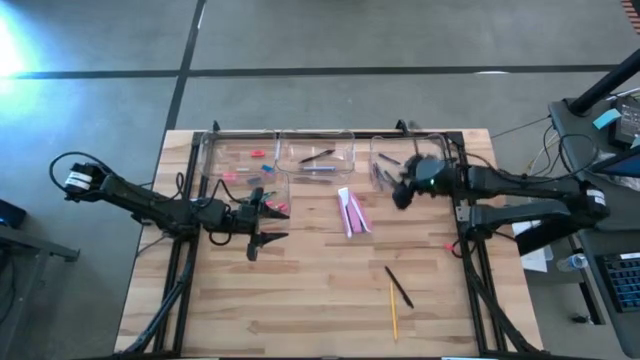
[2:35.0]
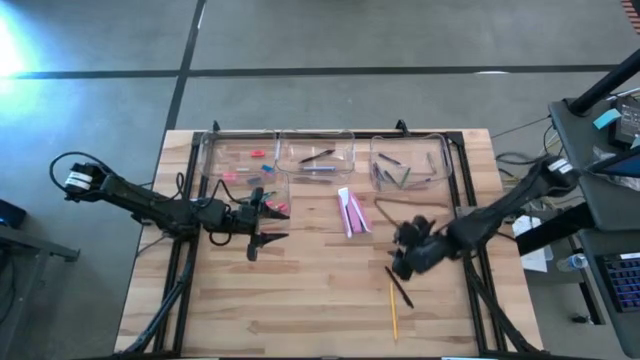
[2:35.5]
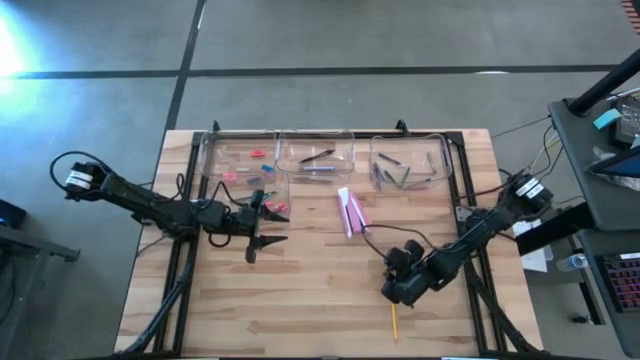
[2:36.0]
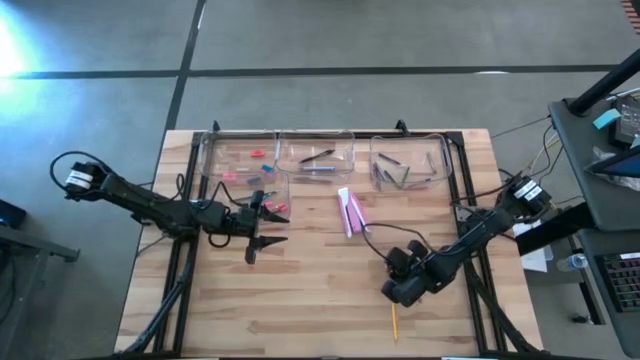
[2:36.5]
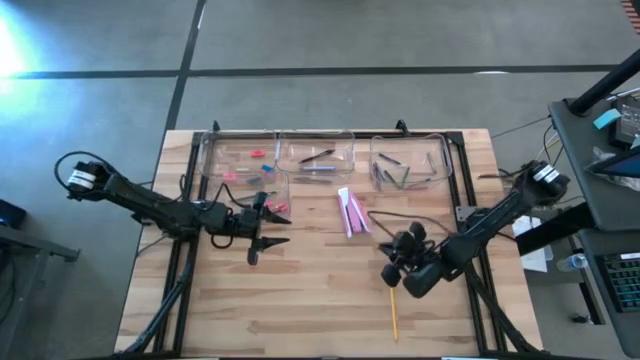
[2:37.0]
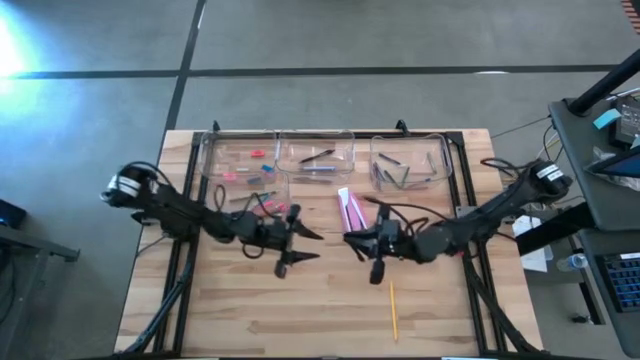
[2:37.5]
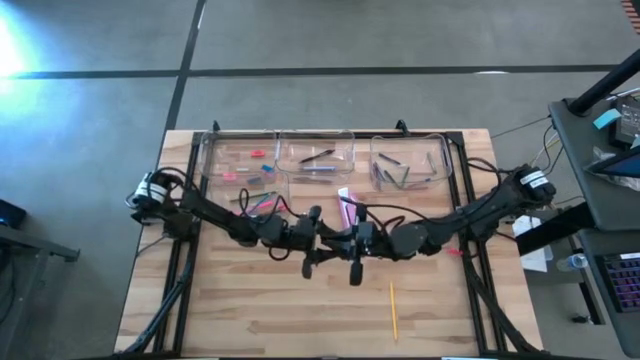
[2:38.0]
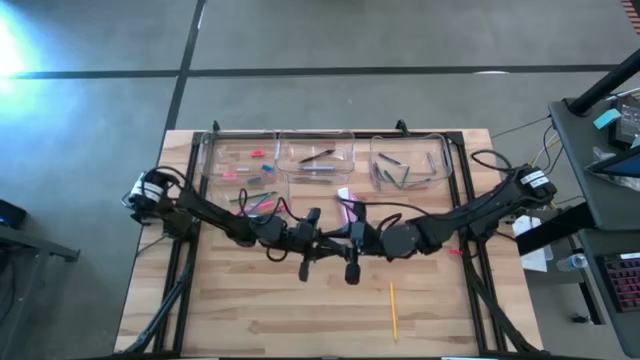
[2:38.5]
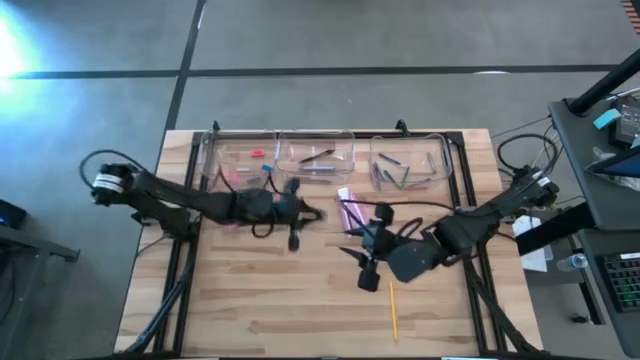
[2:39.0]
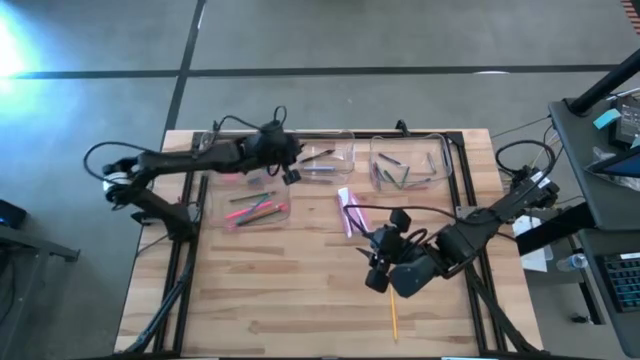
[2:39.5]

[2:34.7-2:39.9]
Task: Sort crayons/erasers/pens/pencils in bins
Put the black pen into the top middle transparent bin

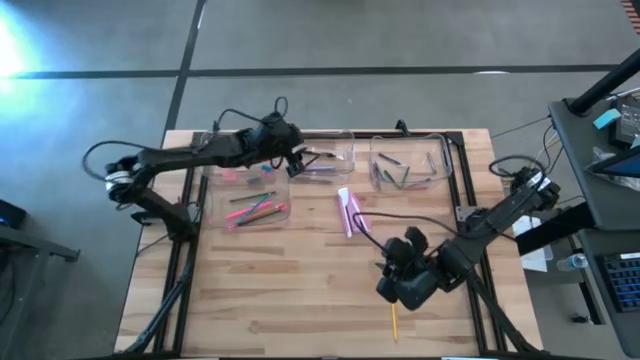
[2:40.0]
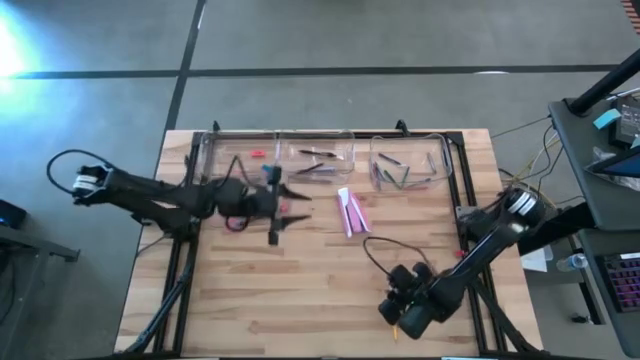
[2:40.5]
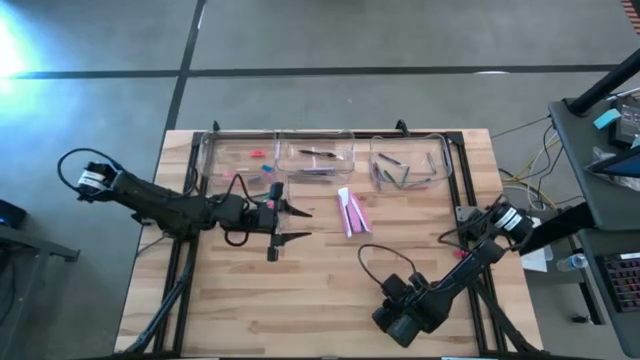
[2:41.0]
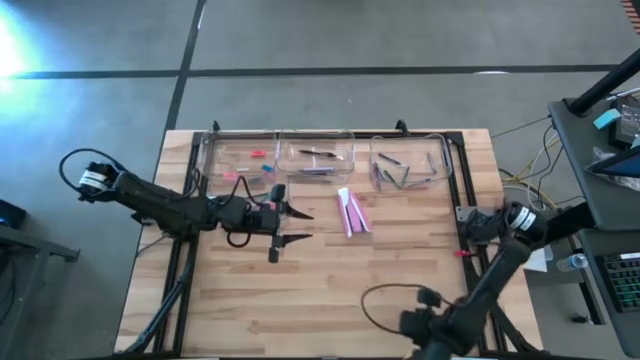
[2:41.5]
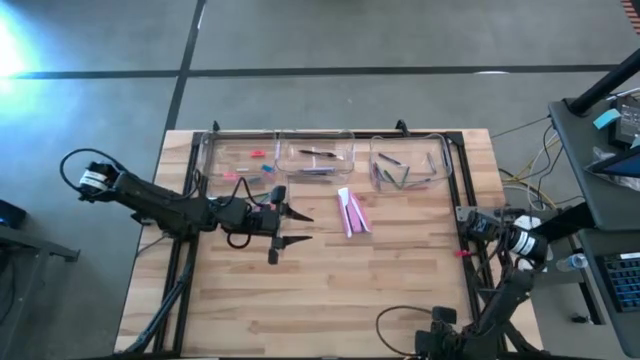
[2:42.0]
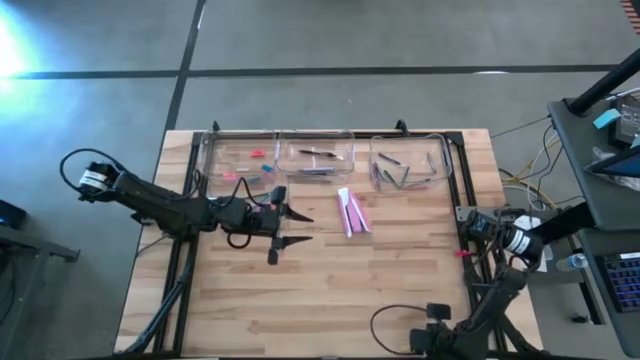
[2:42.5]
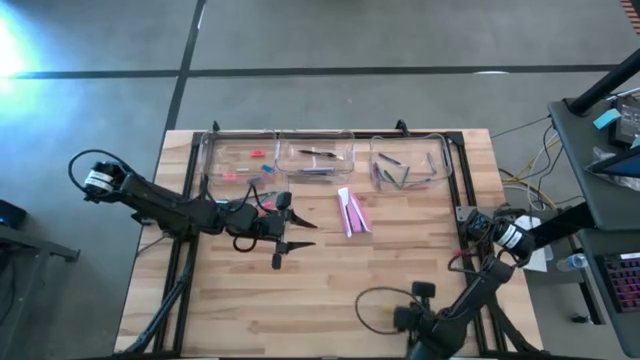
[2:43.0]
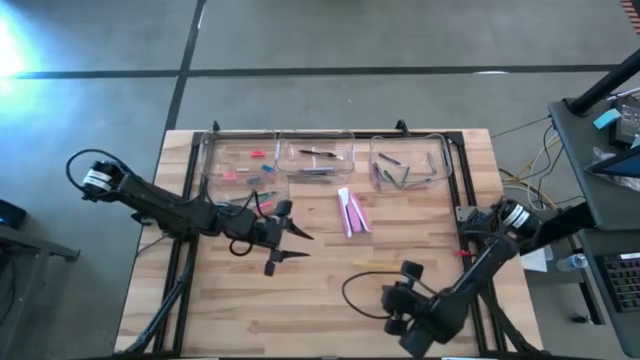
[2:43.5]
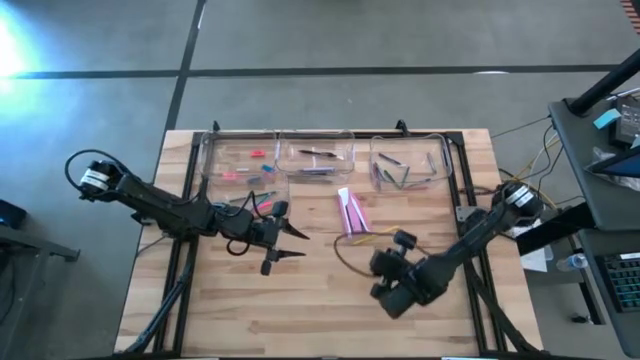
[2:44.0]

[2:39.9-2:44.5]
Put the yellow pencil into the bottom left transparent bin

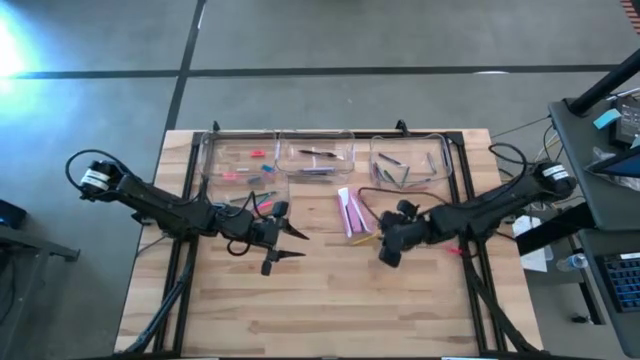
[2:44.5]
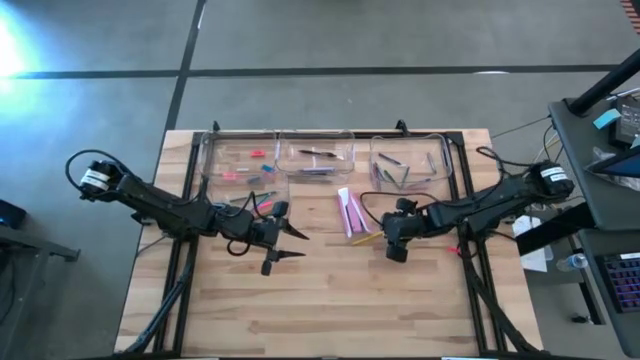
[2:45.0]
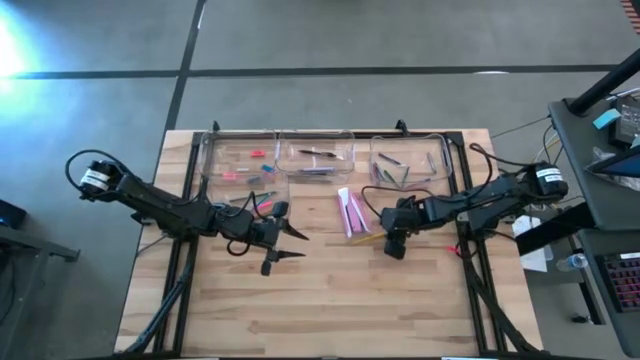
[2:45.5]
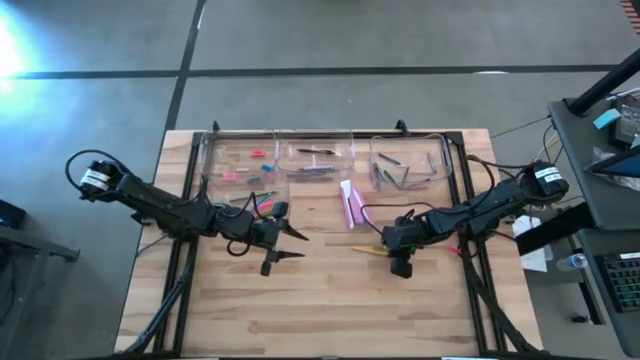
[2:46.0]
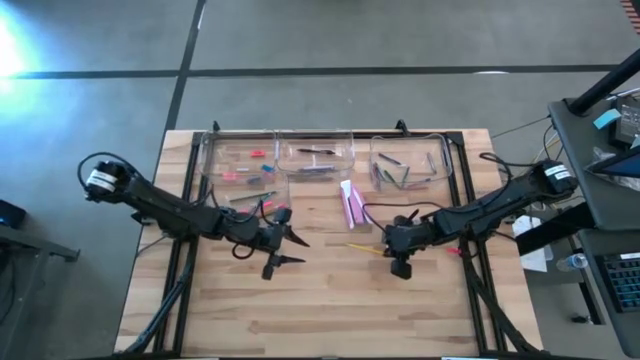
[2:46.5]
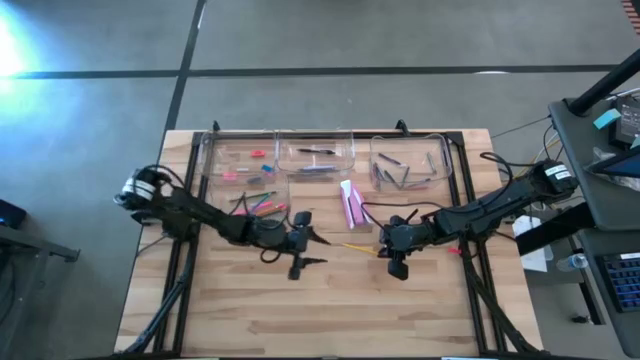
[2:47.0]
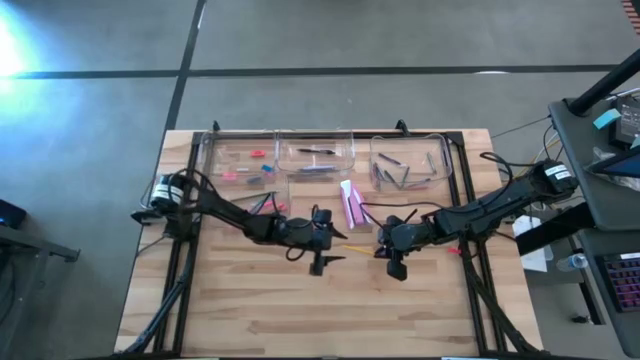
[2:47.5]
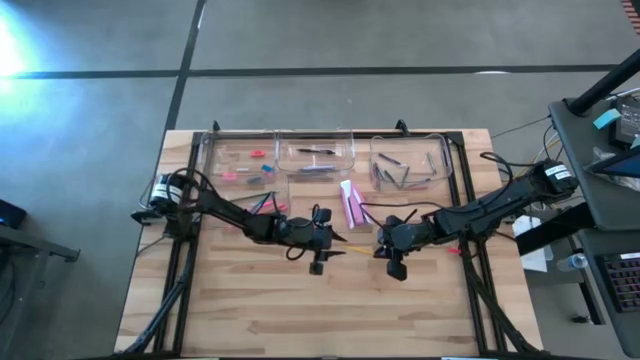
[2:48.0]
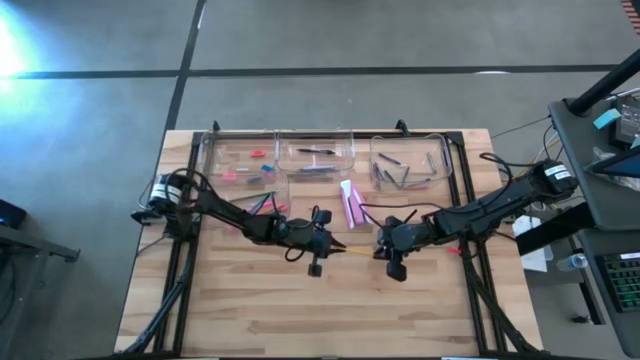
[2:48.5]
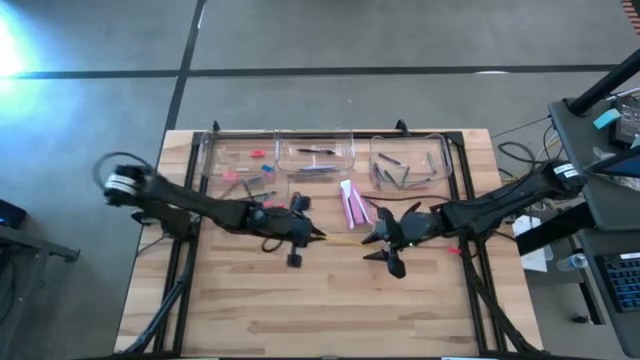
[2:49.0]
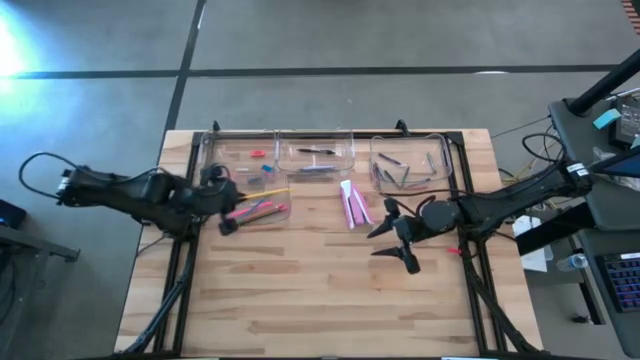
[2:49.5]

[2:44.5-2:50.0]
Put the yellow pencil into the bottom left transparent bin

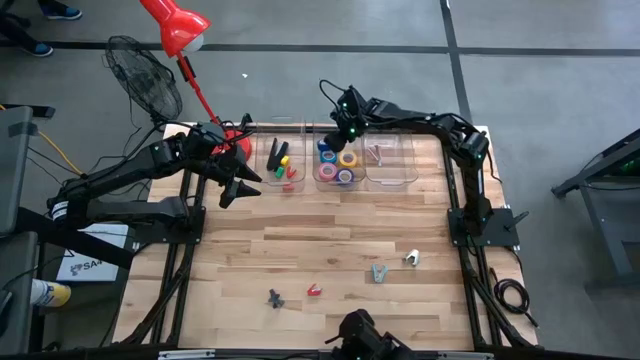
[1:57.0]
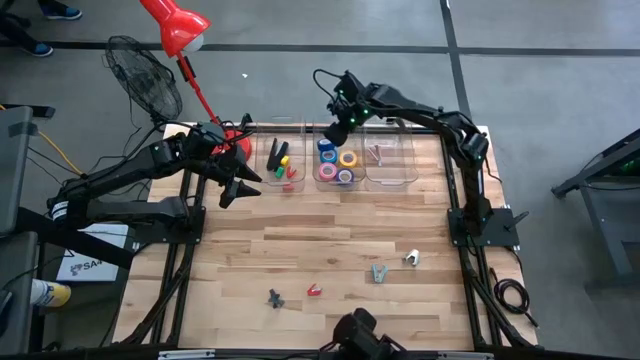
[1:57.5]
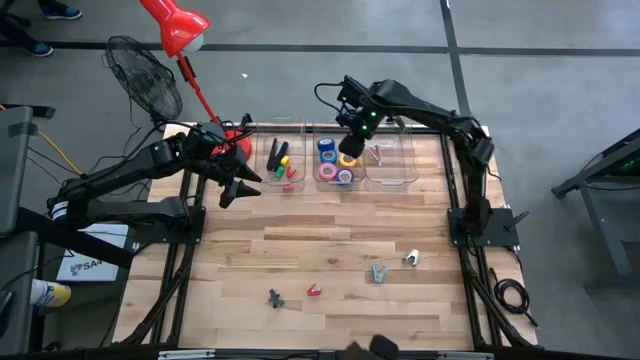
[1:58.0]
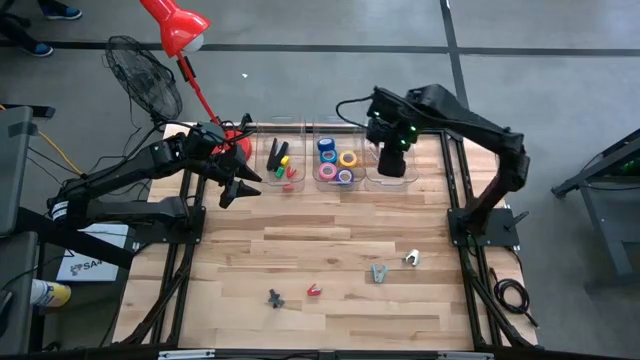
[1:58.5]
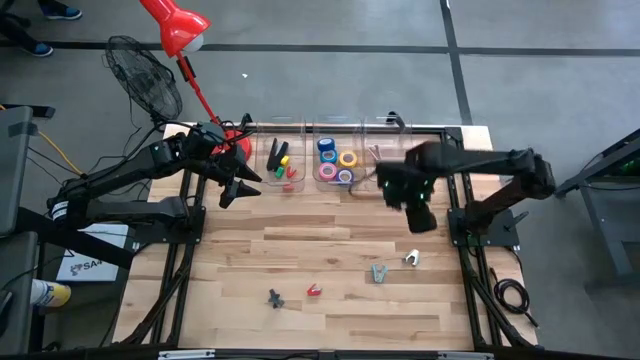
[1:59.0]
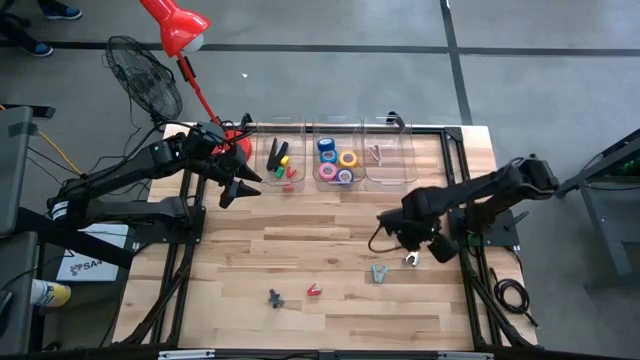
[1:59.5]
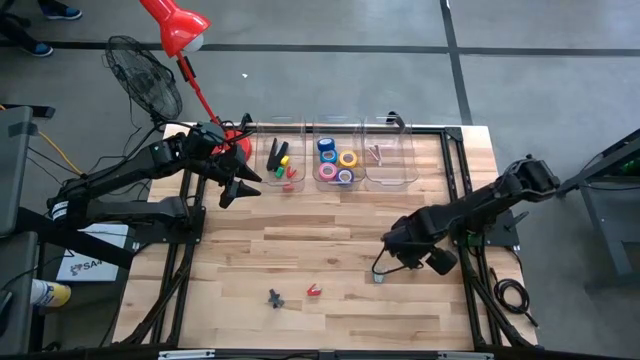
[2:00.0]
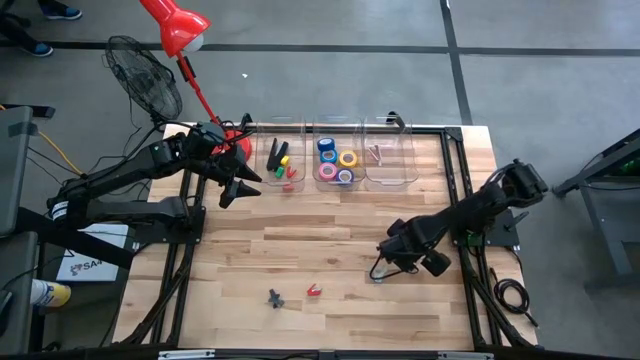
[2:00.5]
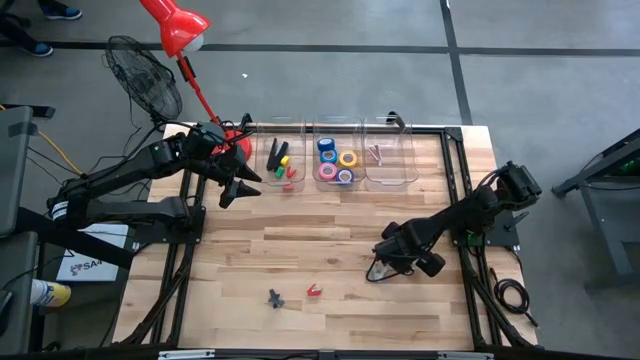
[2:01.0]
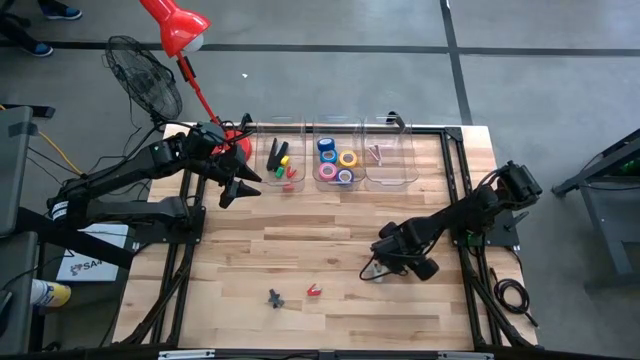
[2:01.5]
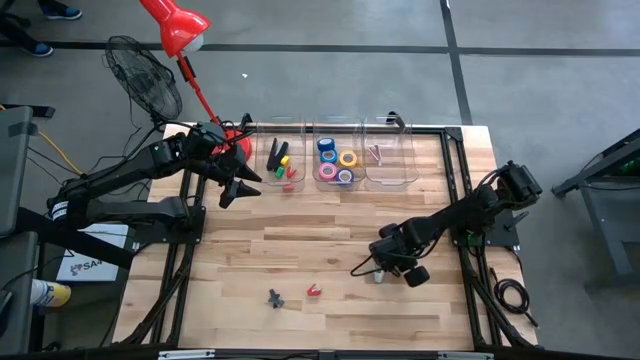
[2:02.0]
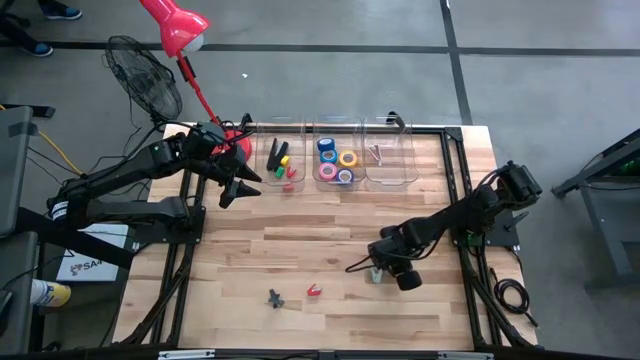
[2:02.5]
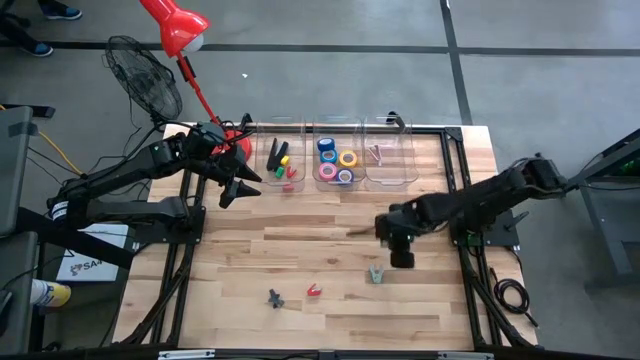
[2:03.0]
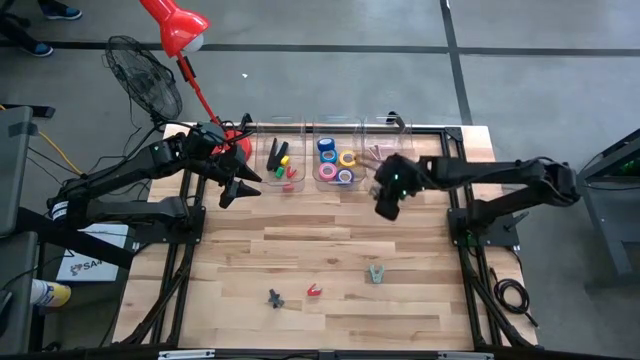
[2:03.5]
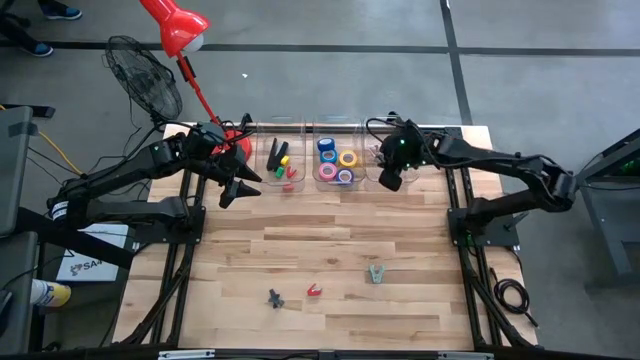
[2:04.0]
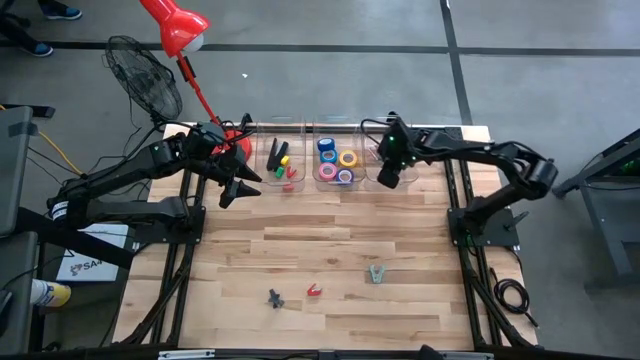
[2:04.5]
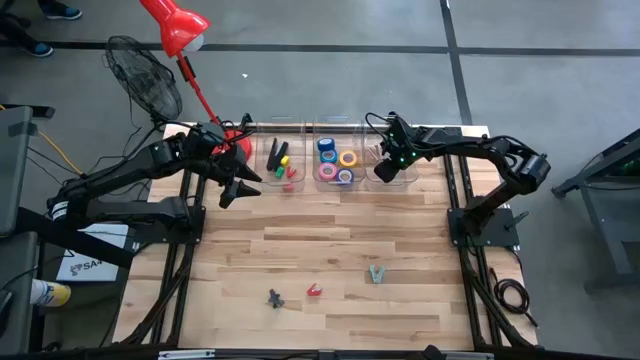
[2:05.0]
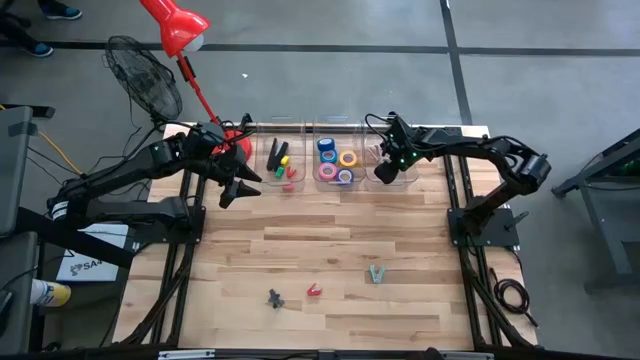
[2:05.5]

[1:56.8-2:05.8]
Task: Pick and place Stapler, Stapler remover, tape
Put the gray staple remover into the right transparent bin
